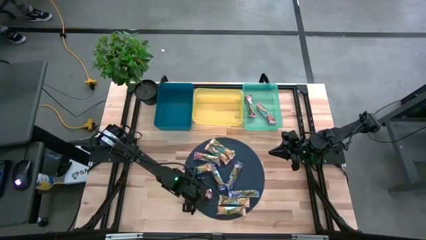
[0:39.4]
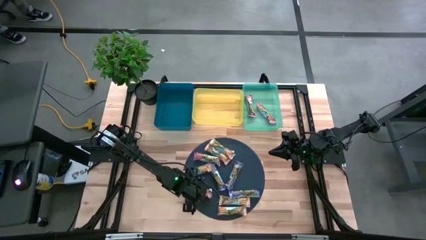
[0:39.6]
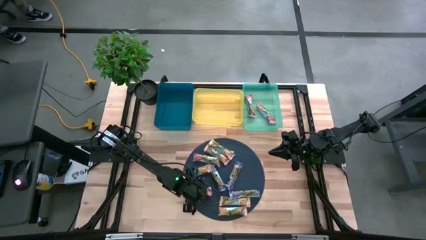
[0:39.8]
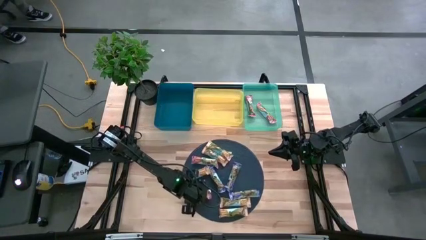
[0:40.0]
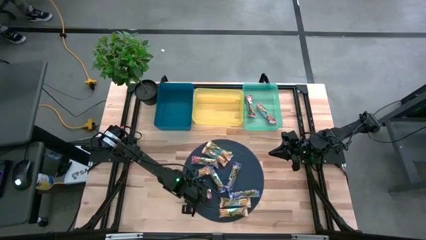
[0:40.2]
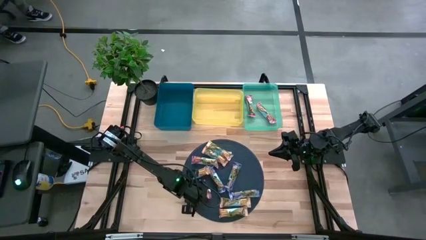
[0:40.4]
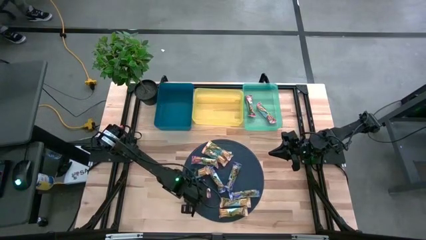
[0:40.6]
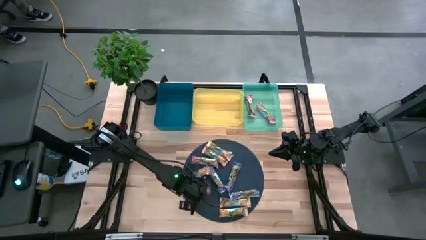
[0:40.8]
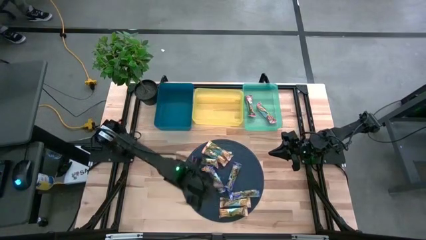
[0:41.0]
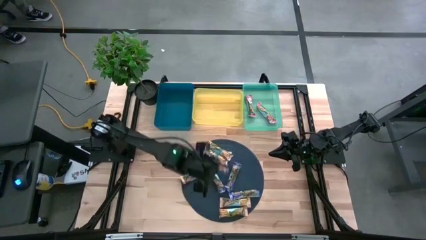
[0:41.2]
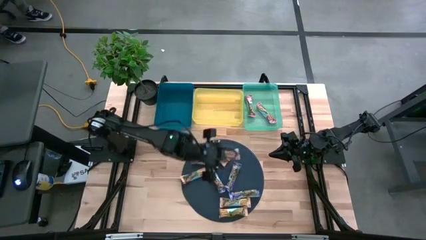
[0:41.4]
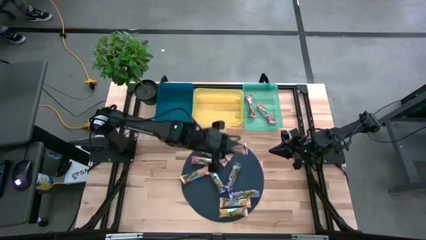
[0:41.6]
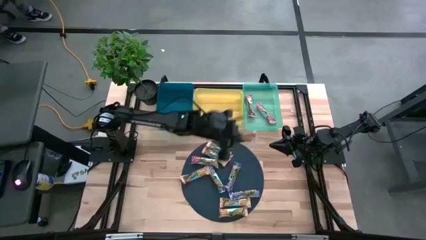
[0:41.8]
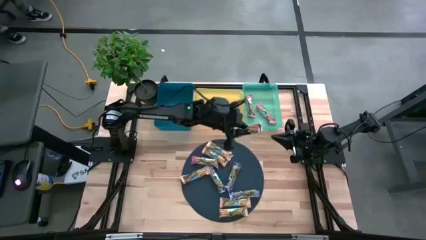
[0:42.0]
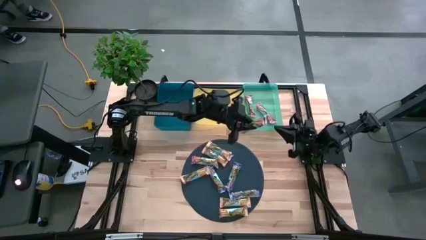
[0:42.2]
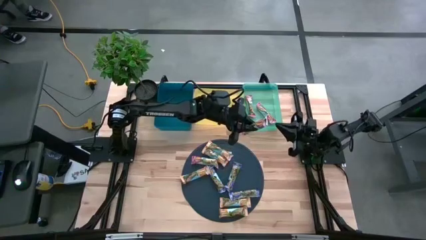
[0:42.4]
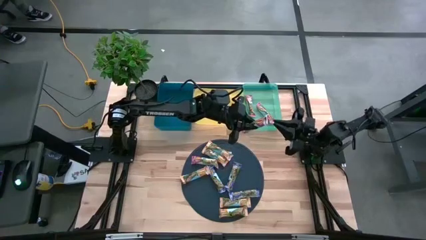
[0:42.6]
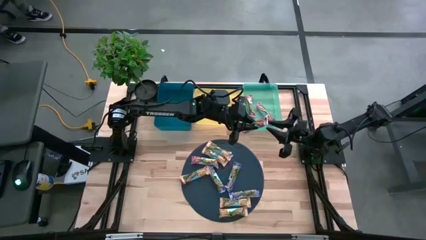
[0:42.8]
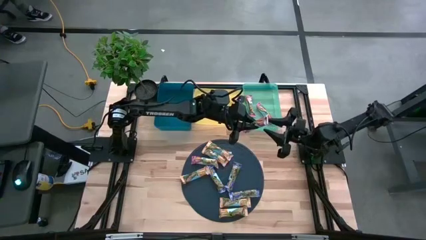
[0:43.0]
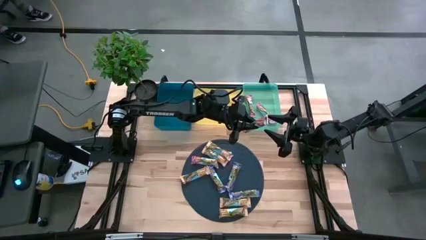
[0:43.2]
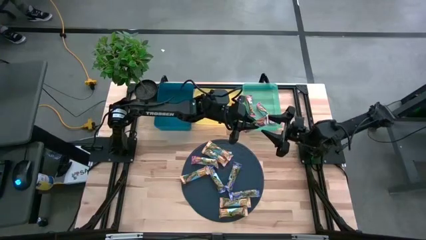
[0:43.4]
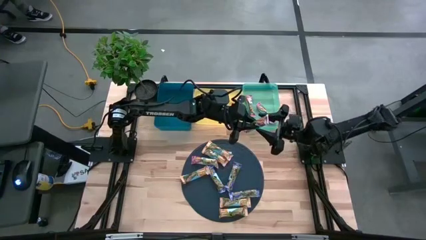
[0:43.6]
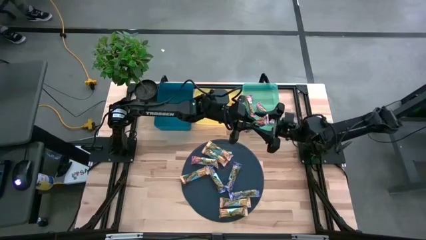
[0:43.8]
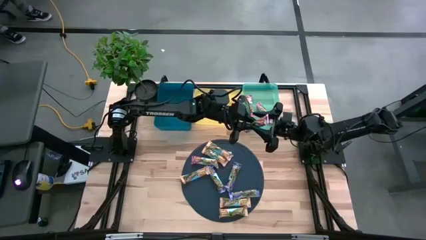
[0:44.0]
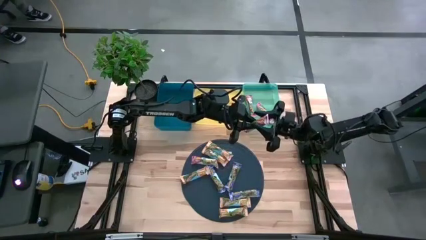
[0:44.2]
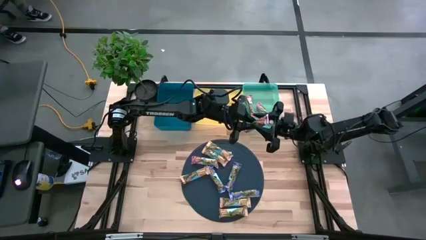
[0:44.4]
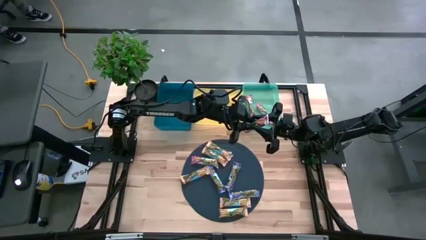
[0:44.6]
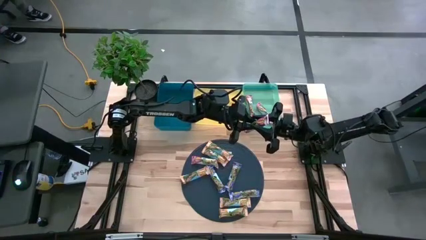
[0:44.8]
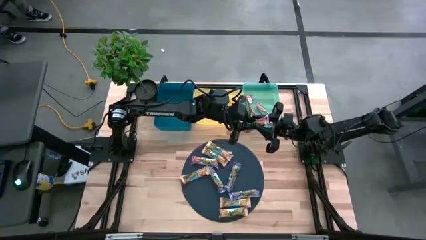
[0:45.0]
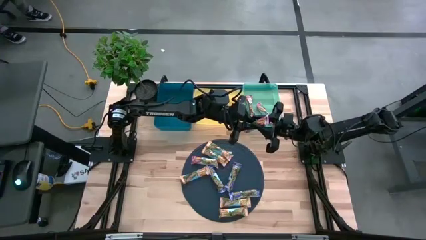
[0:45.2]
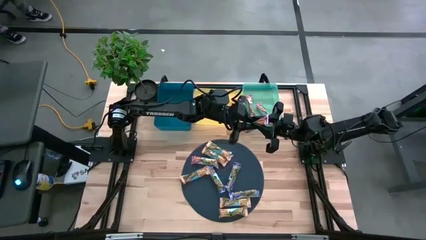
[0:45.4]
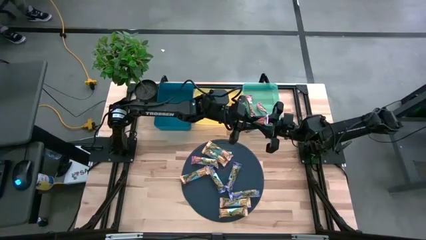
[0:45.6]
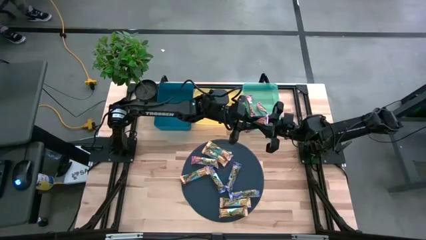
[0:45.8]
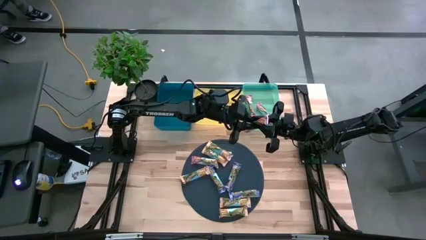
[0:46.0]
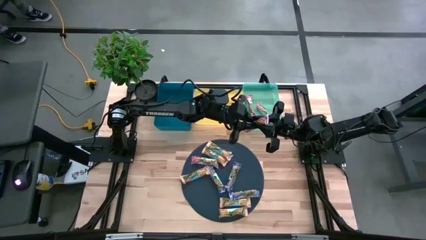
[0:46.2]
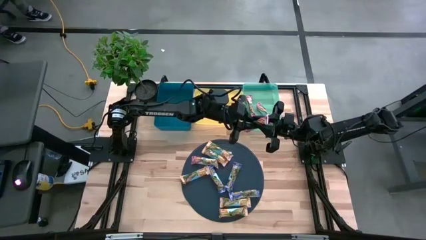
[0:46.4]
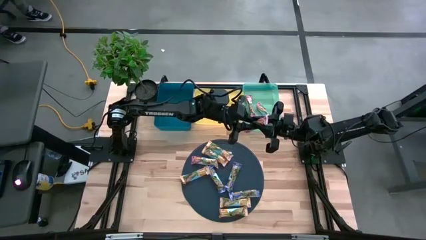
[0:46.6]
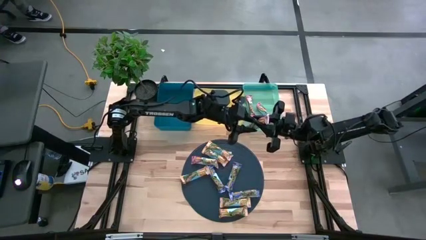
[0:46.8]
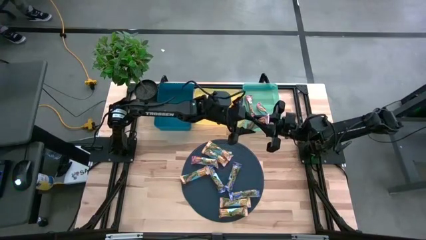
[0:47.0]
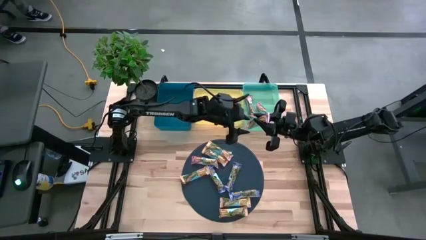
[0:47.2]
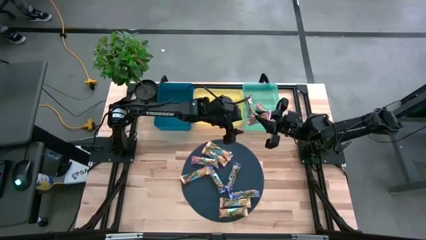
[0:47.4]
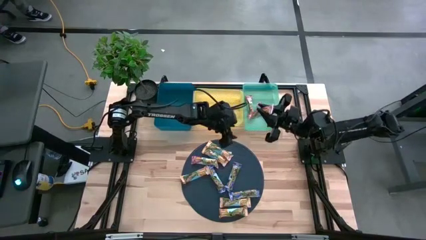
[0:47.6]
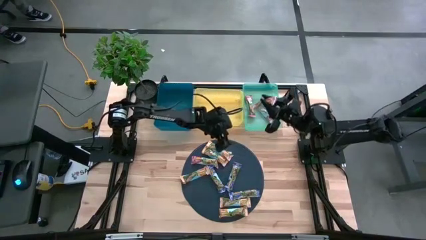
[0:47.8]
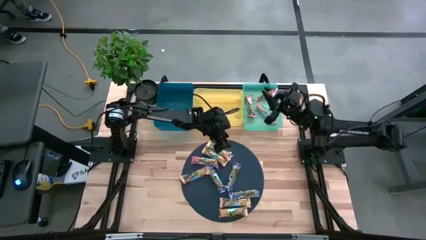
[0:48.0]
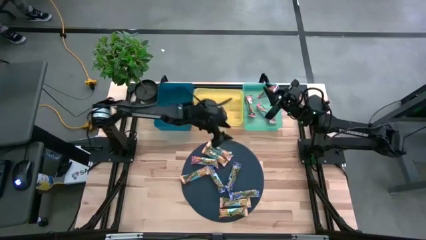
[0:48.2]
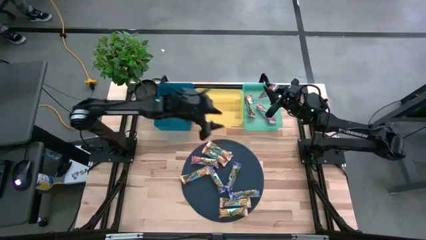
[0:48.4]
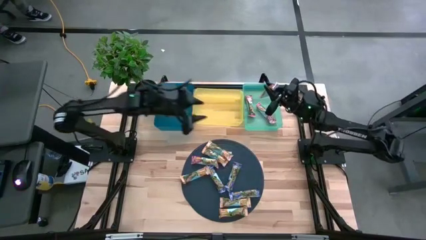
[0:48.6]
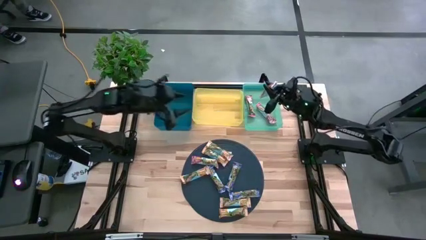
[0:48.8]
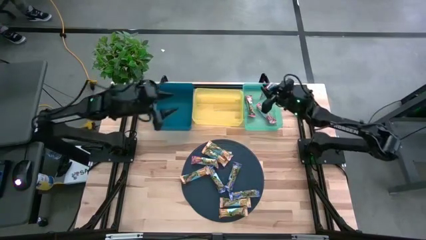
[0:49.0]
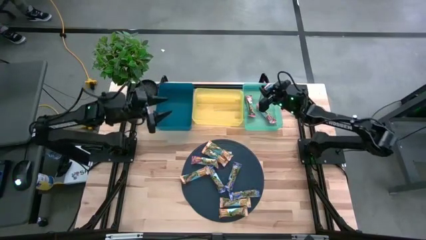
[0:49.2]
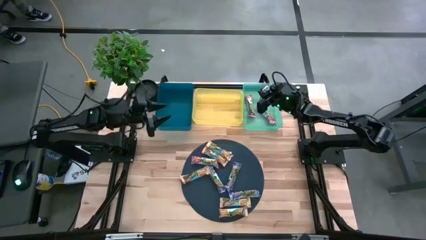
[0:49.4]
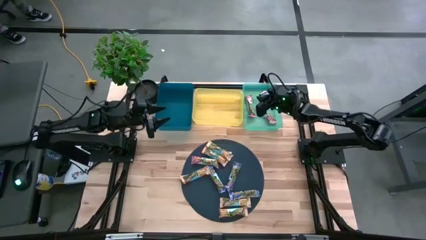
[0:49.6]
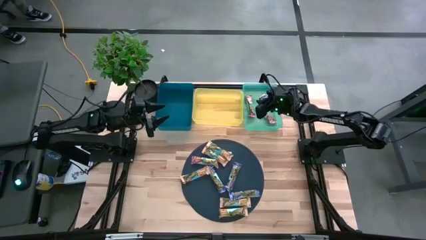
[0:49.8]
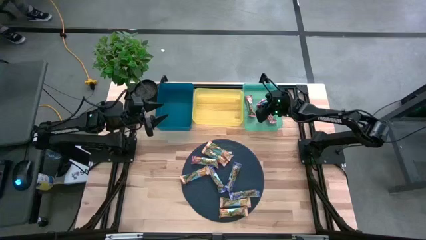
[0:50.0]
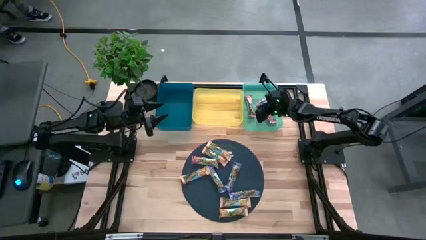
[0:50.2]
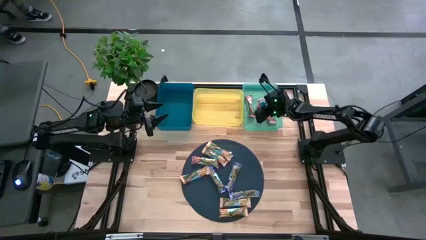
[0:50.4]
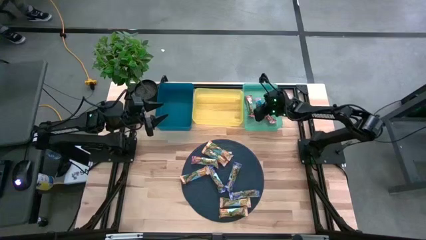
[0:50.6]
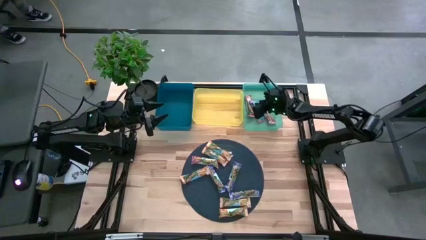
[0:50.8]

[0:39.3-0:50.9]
Task: Pick and place Granola Bars by type
Put the red granola bar into the green bin
